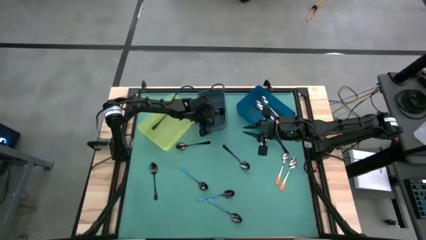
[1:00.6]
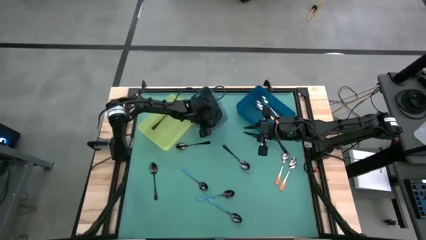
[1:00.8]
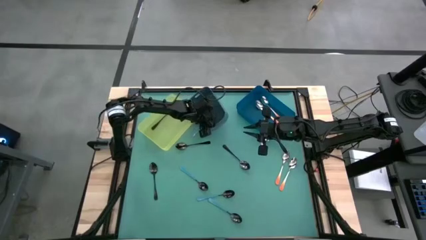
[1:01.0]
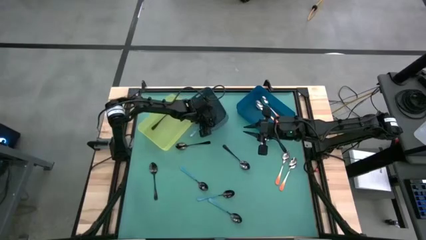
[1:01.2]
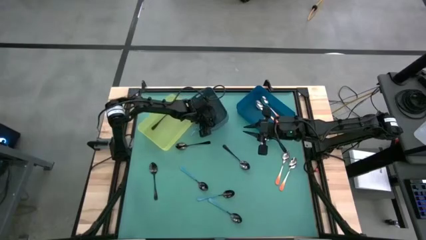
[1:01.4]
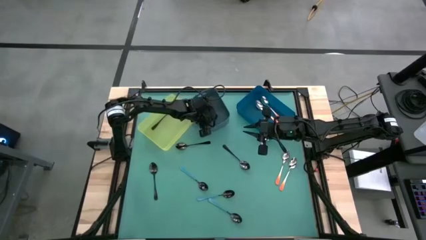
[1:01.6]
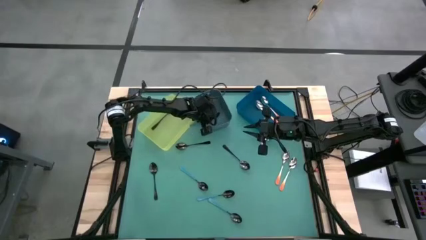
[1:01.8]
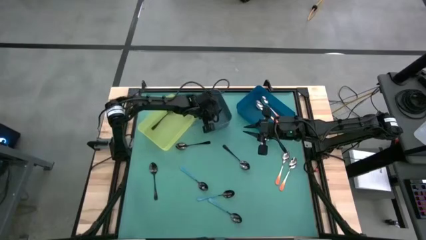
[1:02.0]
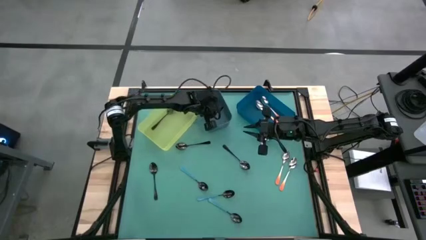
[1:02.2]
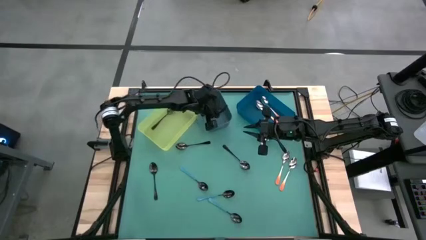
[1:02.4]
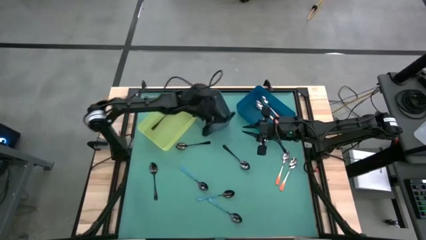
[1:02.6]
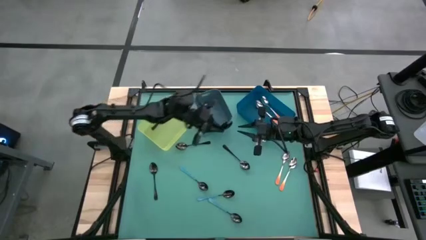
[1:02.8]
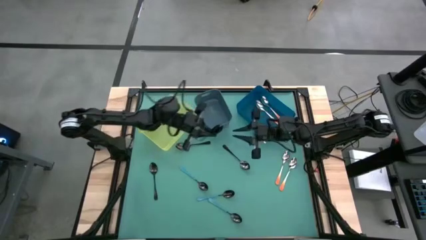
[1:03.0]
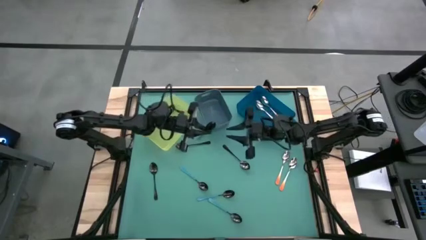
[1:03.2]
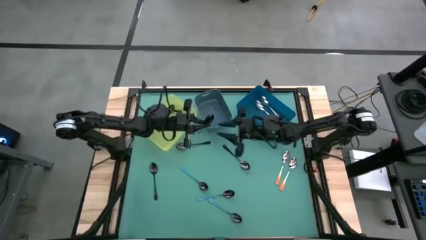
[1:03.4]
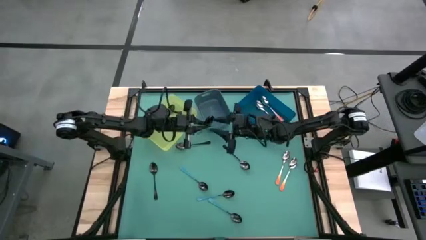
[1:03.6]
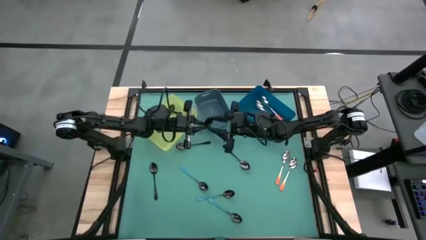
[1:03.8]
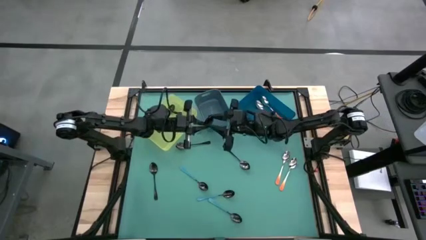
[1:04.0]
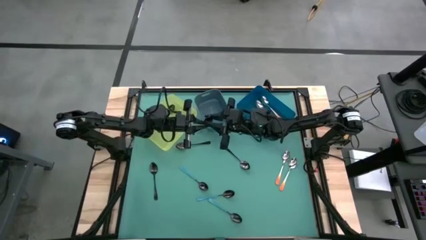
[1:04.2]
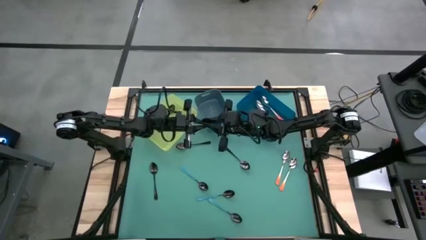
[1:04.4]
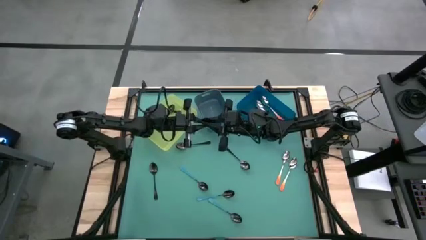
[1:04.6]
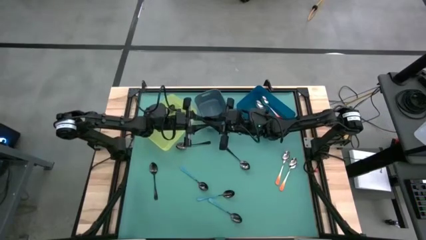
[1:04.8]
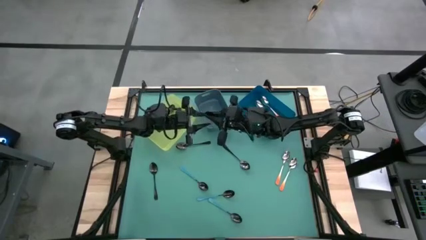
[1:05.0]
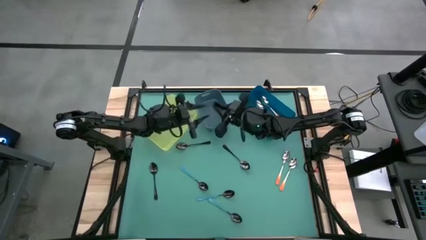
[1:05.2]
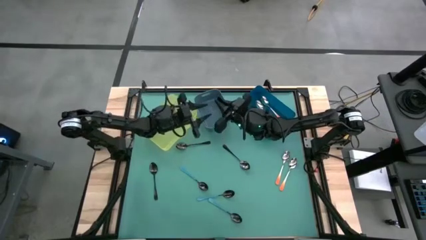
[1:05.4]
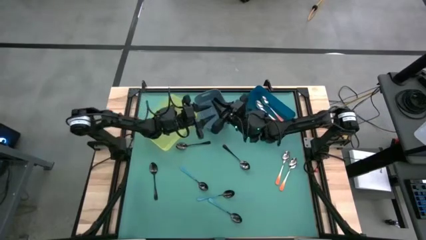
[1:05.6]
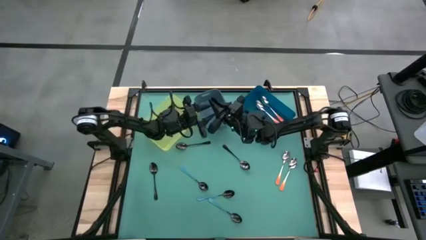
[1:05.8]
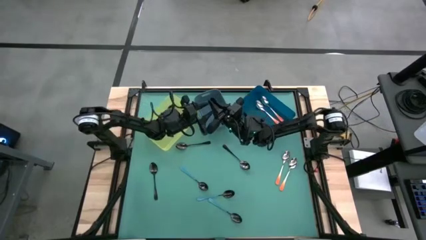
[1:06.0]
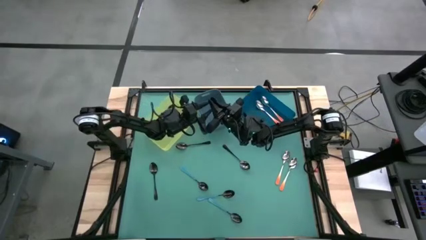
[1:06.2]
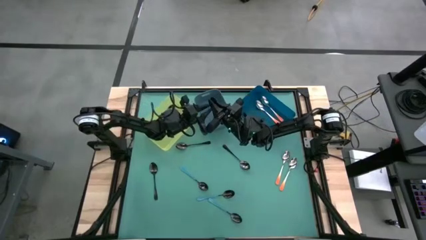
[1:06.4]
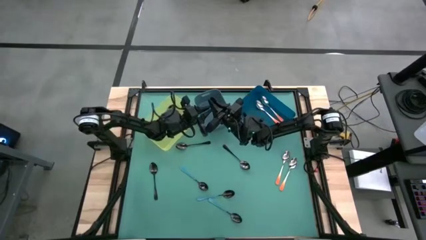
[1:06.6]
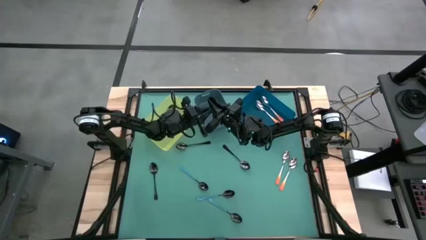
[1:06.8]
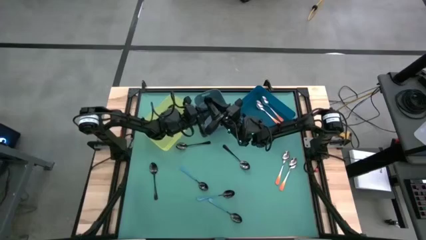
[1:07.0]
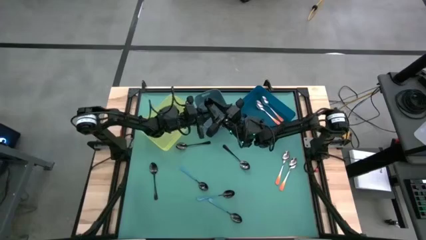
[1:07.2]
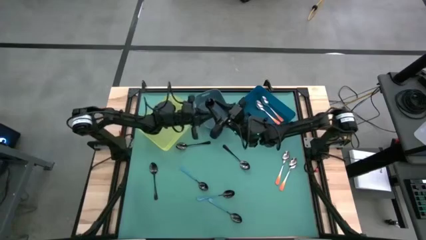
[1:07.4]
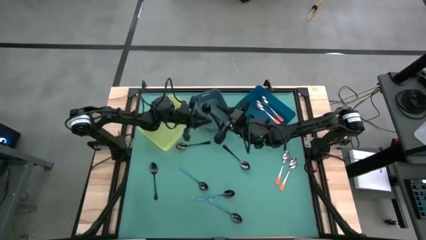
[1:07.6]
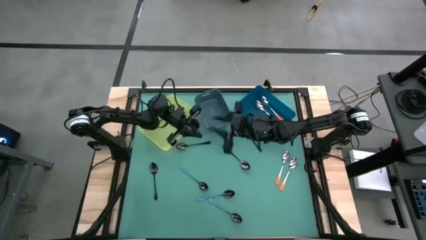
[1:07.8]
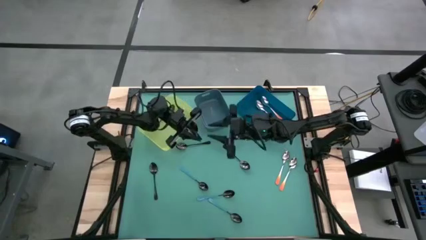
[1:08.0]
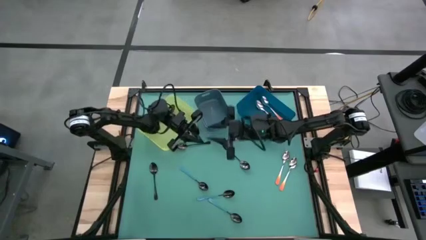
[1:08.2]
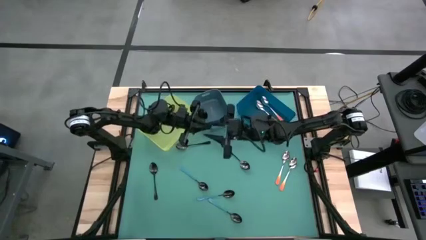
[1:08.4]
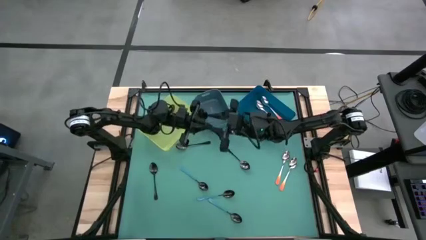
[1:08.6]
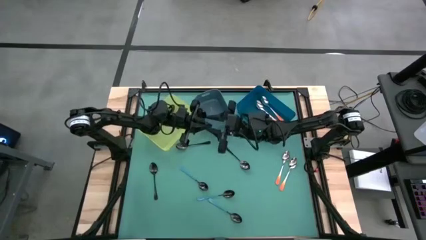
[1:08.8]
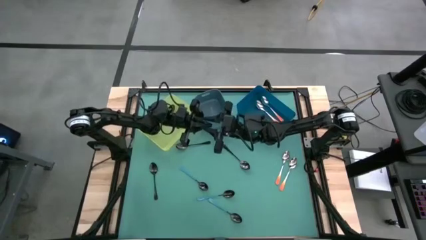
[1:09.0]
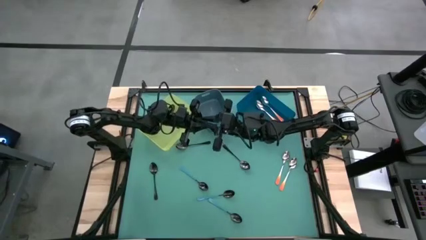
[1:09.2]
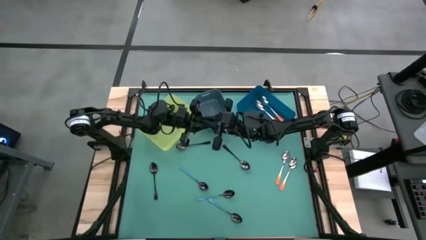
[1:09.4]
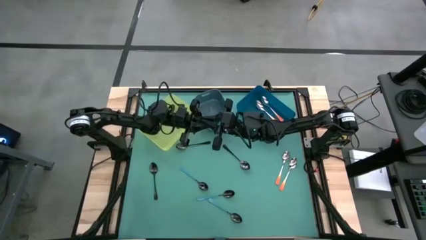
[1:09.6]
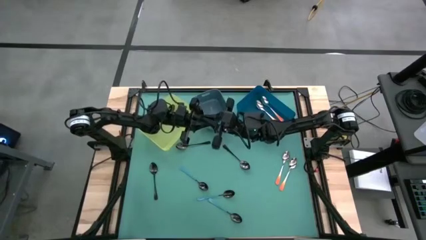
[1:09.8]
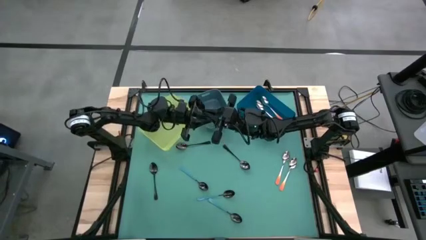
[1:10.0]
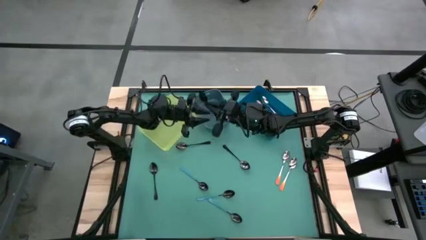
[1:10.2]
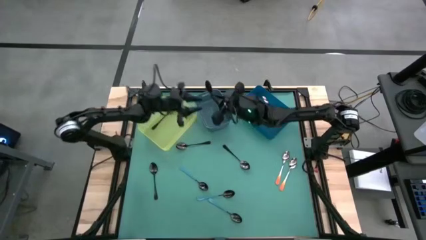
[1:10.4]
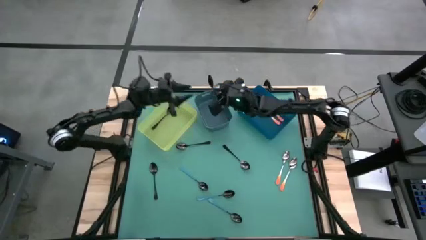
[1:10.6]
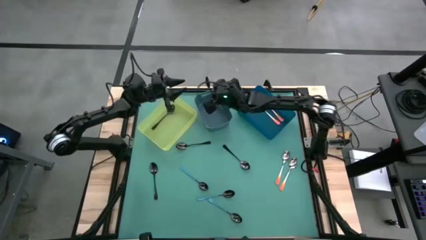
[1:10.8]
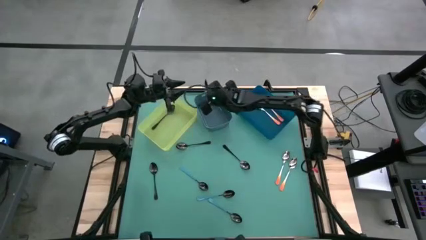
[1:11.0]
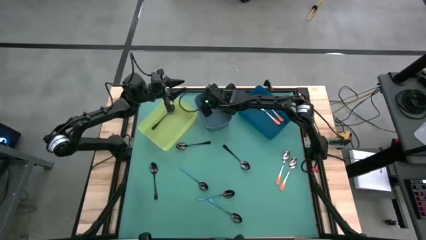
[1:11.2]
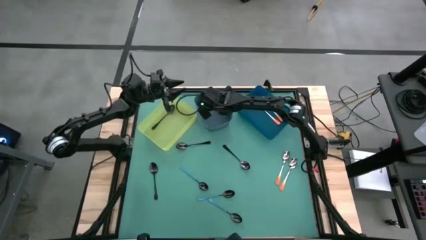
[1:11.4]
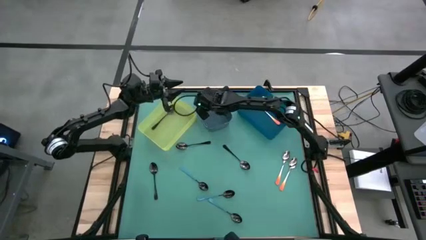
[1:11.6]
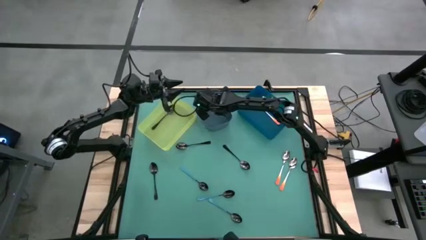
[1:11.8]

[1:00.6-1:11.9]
Task: Sort silverware by color (type)
Put the blue spoon into the dark blue bin
